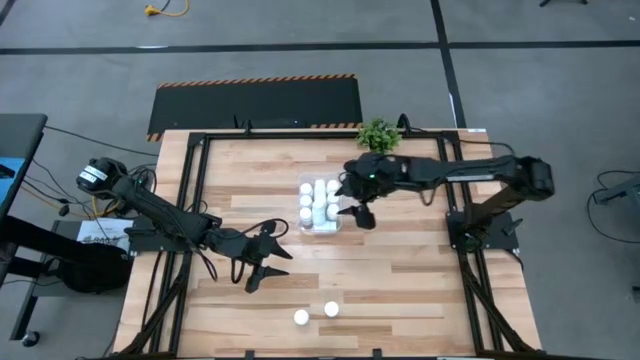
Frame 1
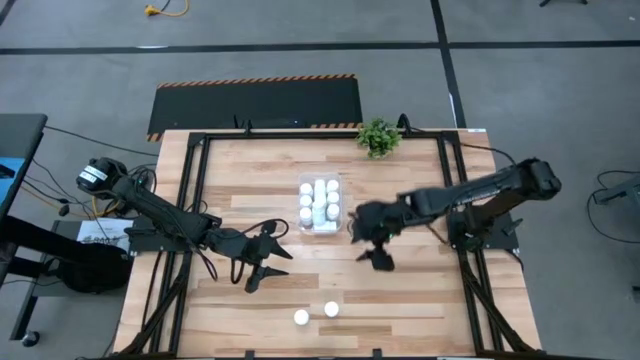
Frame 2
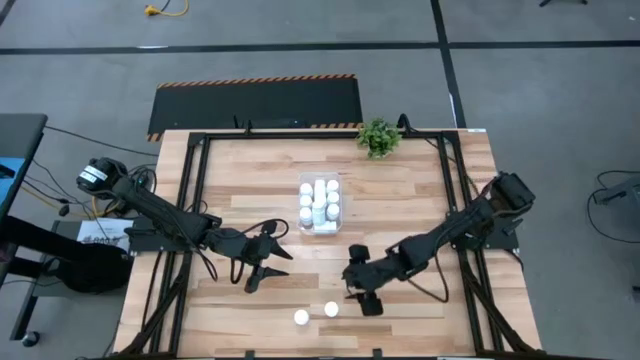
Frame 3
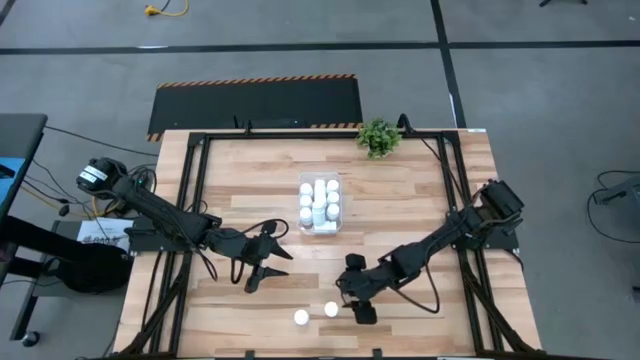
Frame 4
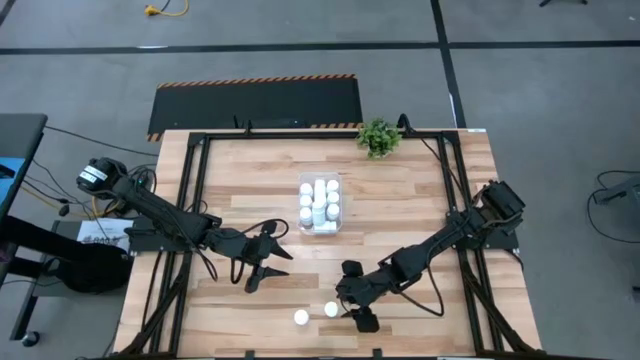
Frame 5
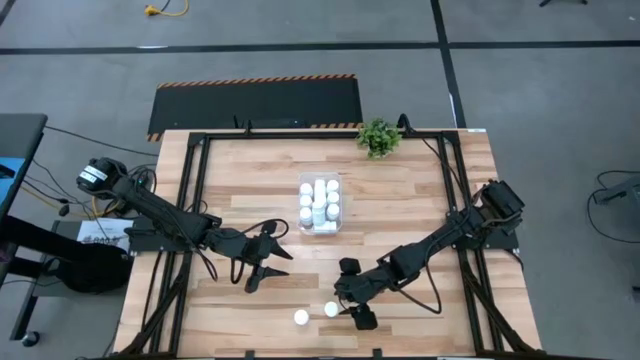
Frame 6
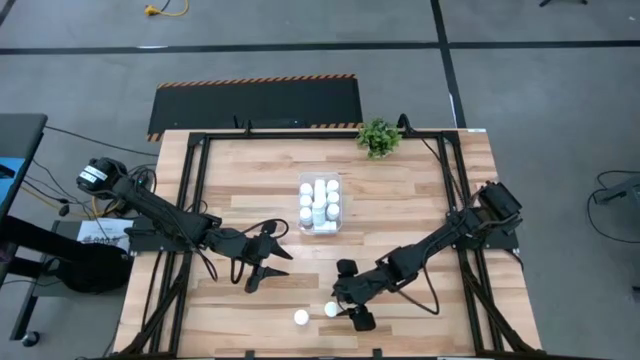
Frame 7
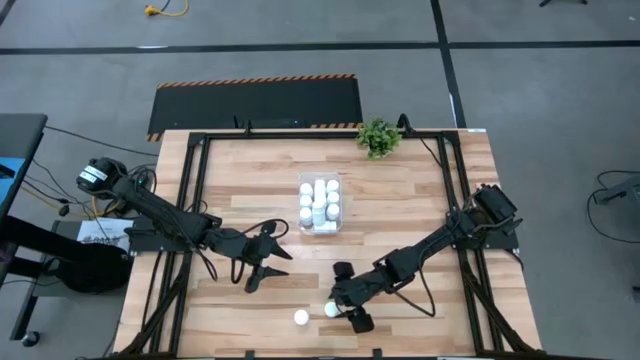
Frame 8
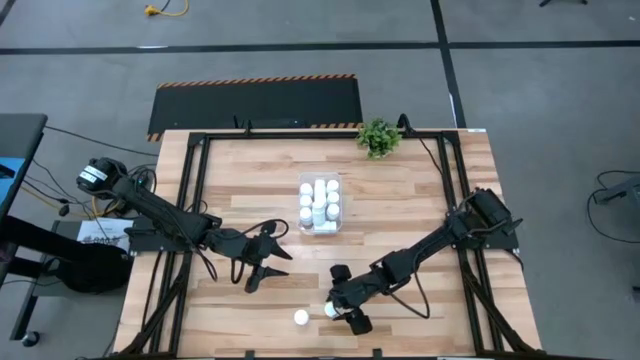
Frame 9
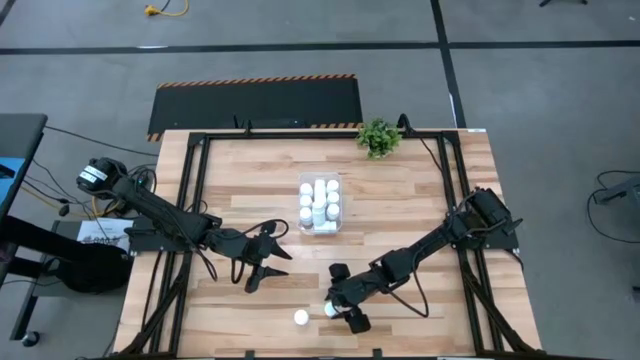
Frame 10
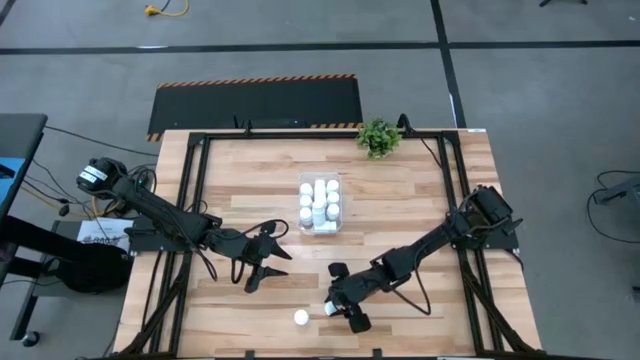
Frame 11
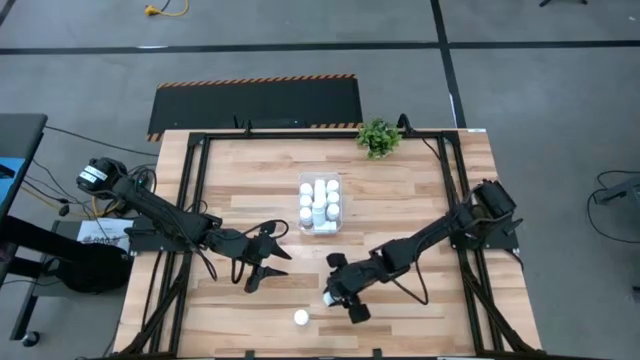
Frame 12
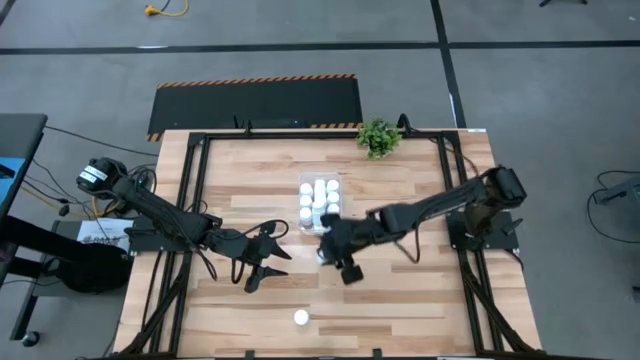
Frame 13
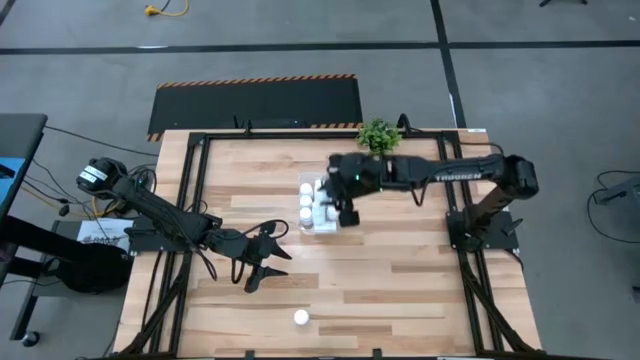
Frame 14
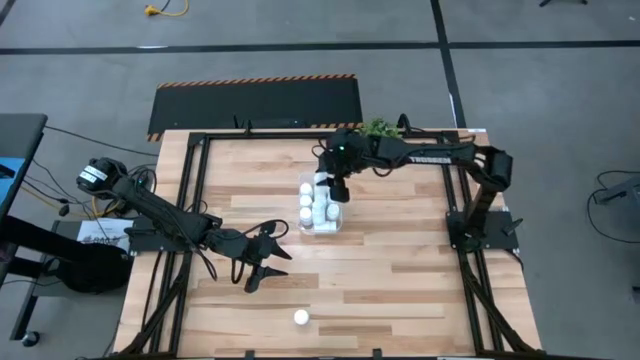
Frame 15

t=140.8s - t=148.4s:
Task: Pick and place pill bottles into a basket
Put the pill bottles into the container

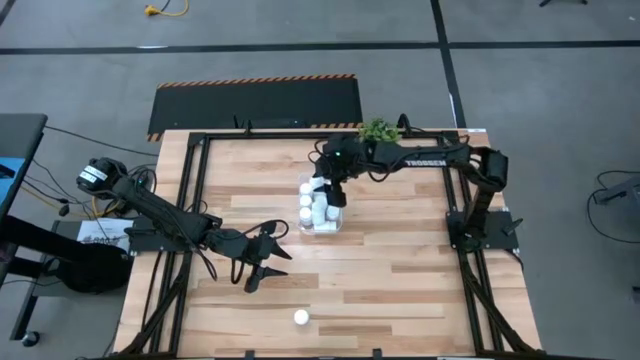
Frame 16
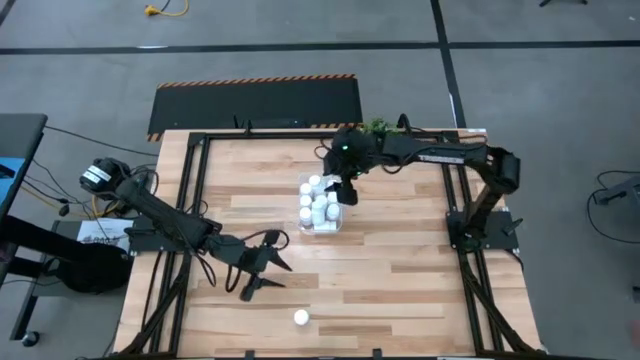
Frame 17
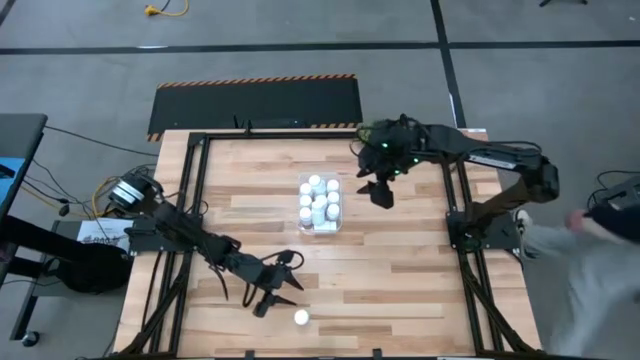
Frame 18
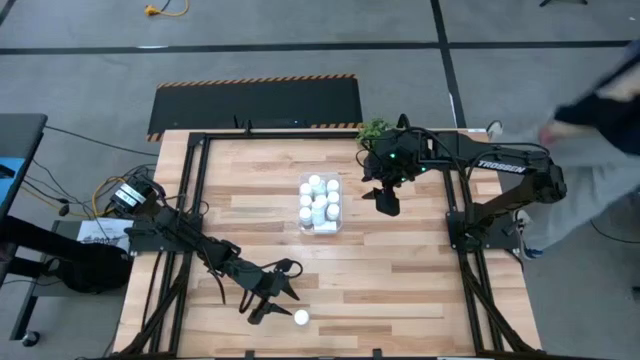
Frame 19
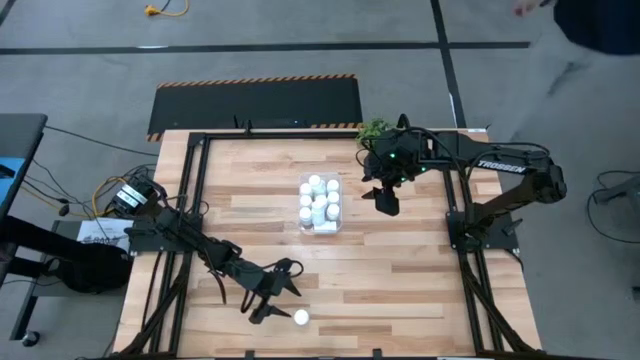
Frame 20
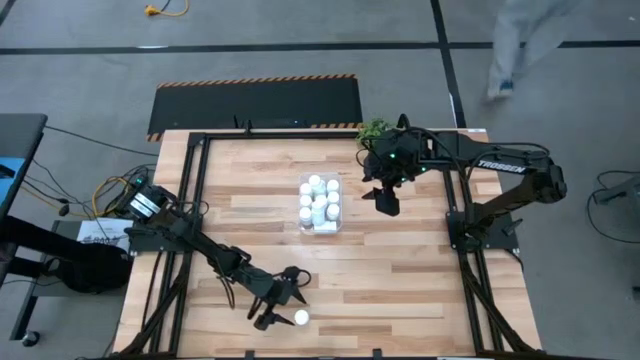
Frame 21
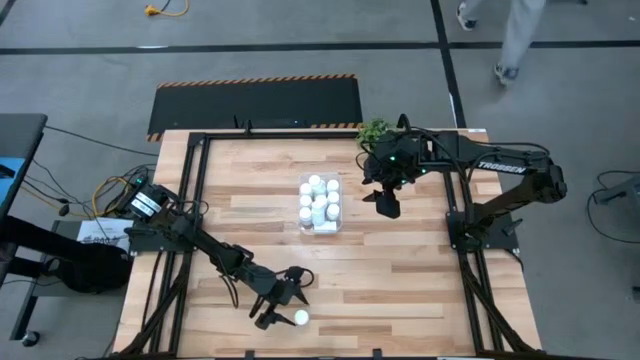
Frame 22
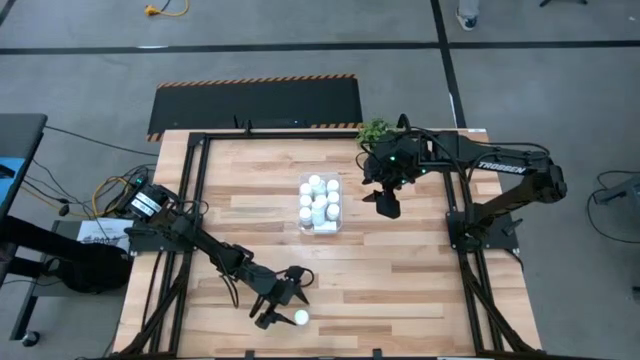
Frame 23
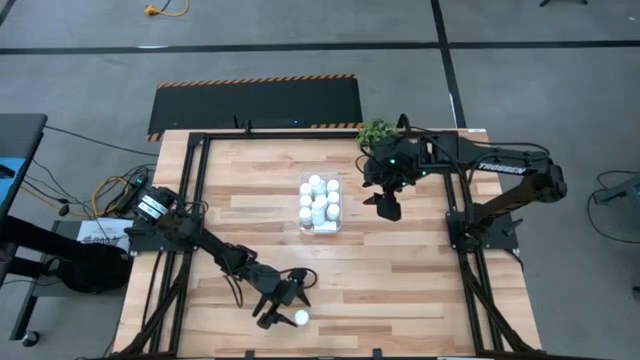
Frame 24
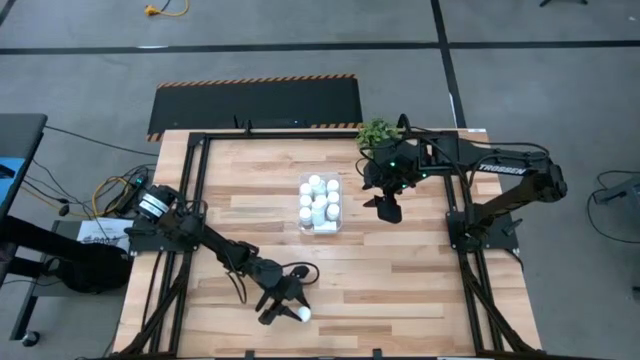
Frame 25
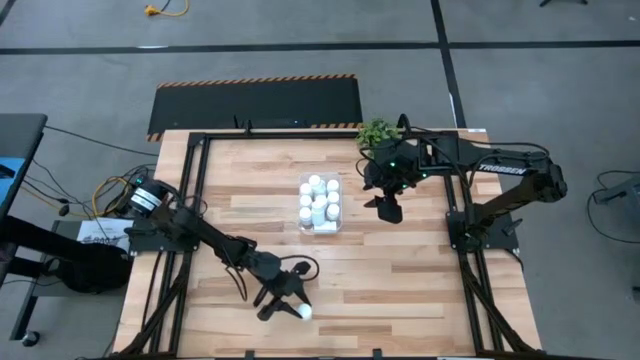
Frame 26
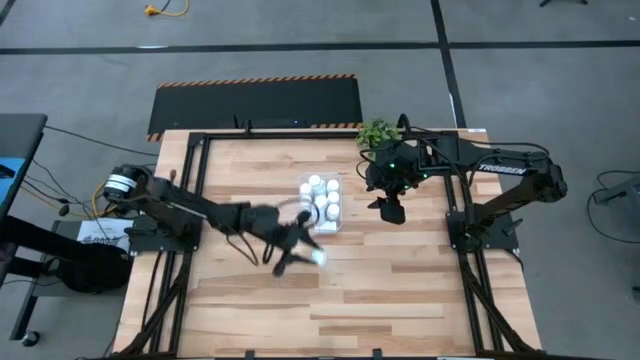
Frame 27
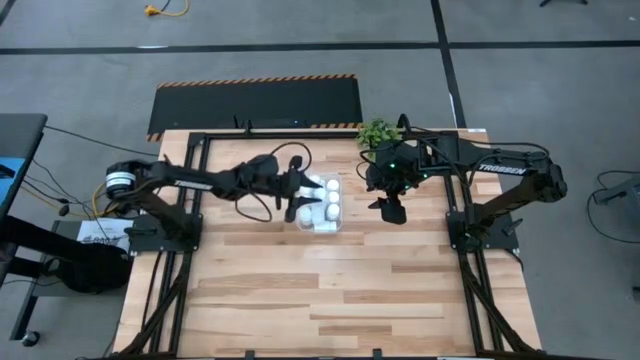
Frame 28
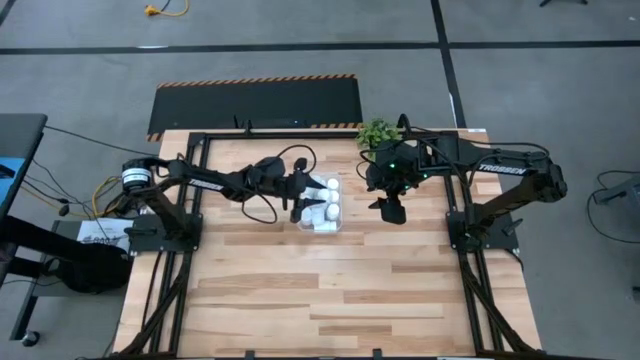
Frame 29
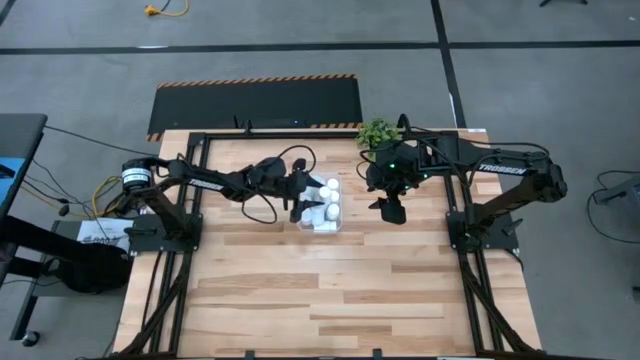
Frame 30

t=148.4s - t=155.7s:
Put the pill bottles into the container

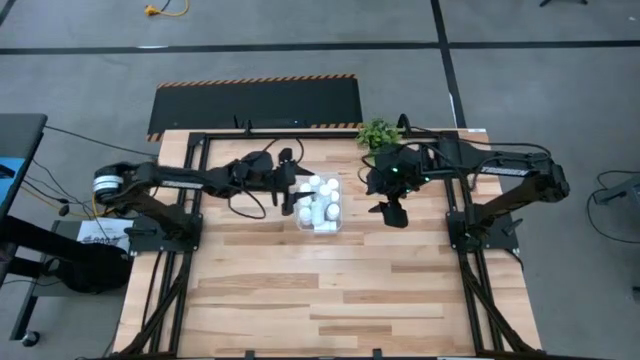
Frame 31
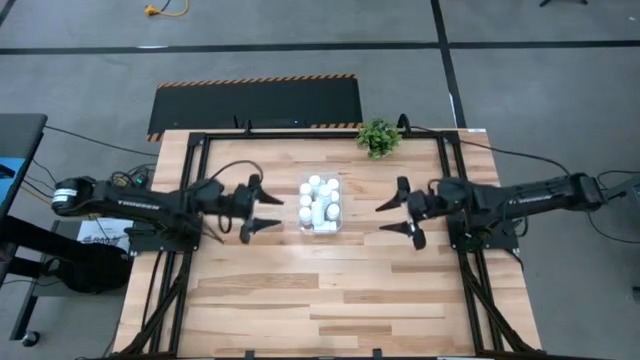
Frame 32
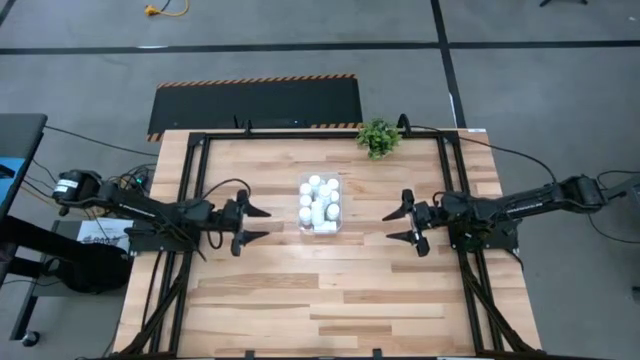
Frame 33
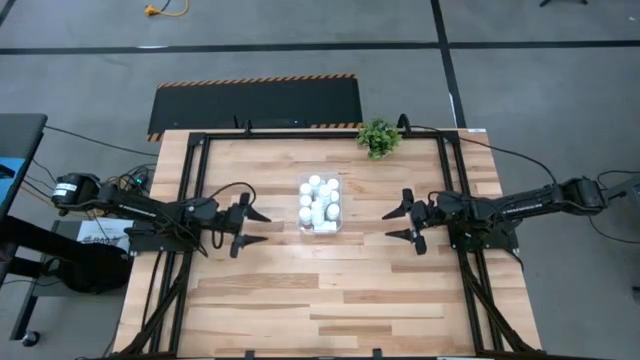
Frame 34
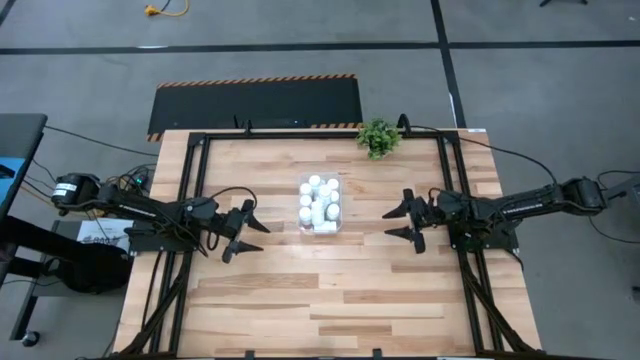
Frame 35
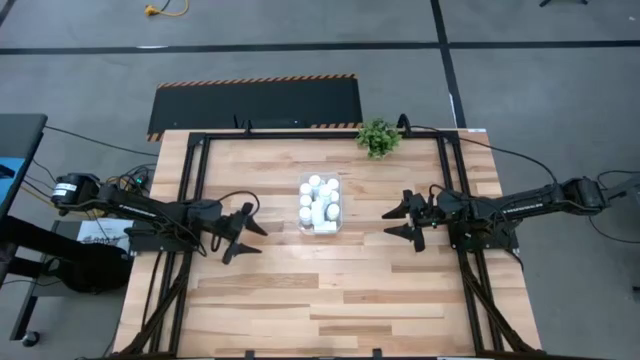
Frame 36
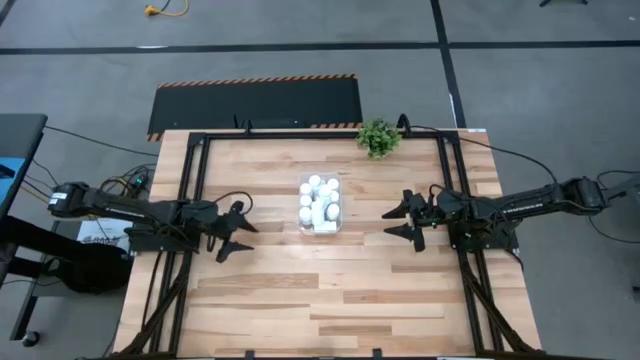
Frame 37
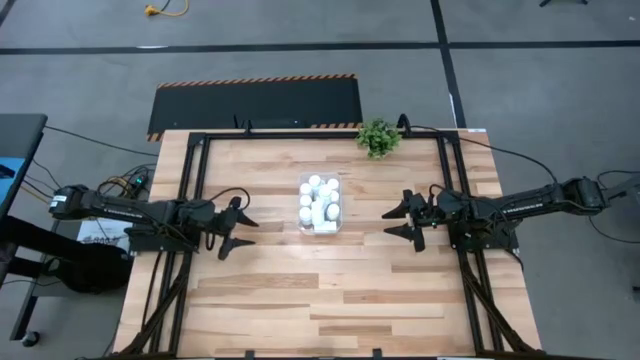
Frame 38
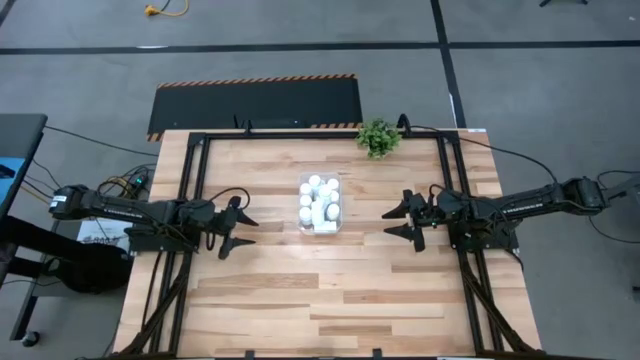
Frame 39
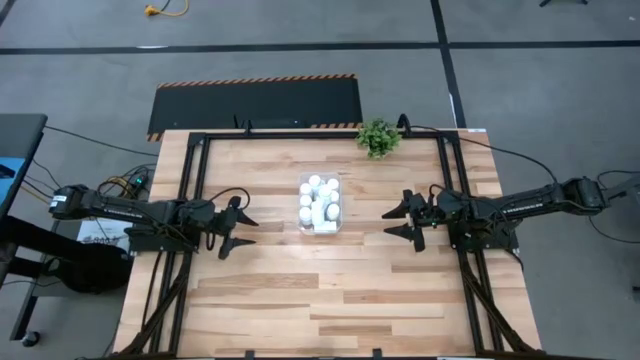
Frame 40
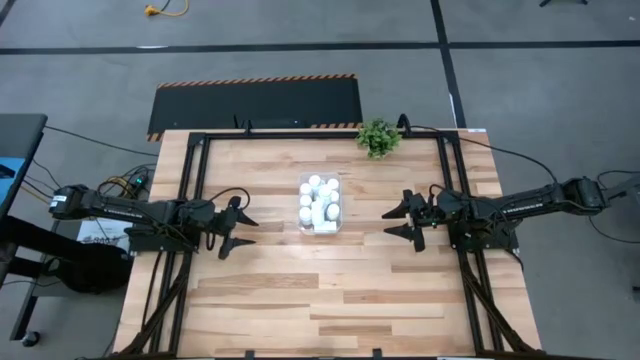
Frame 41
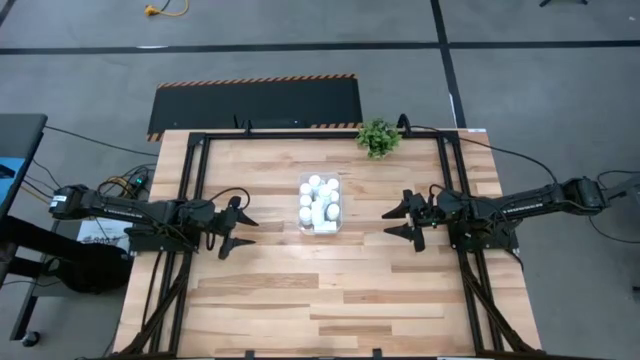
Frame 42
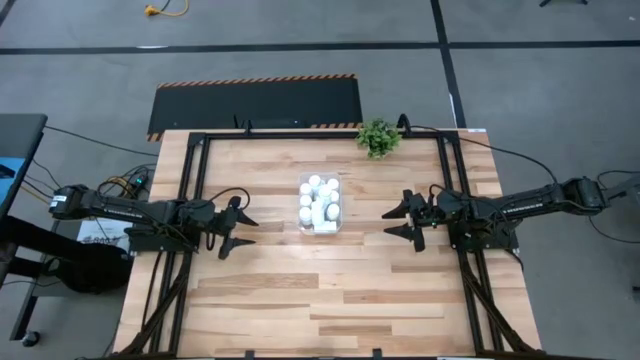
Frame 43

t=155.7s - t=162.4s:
Return to Home Position
